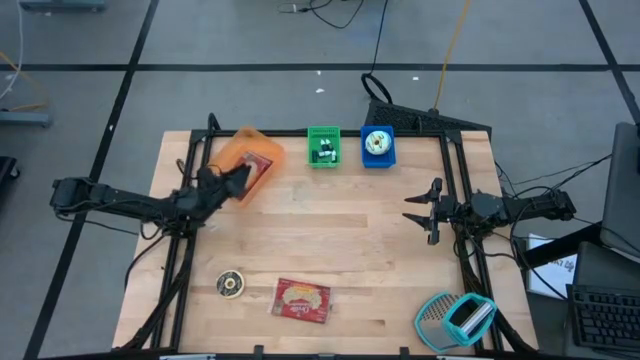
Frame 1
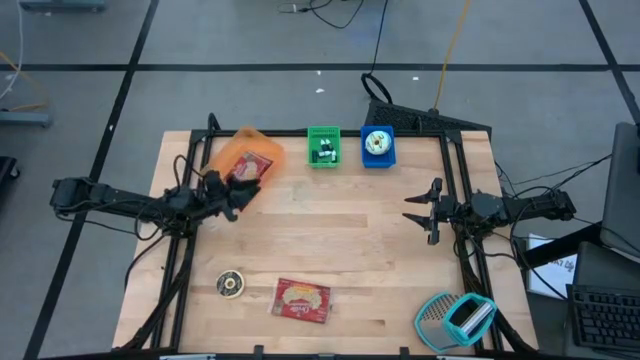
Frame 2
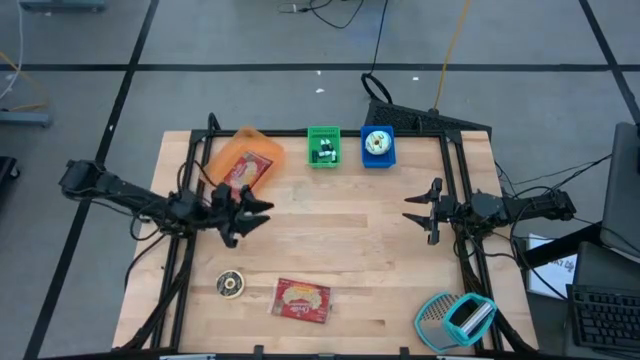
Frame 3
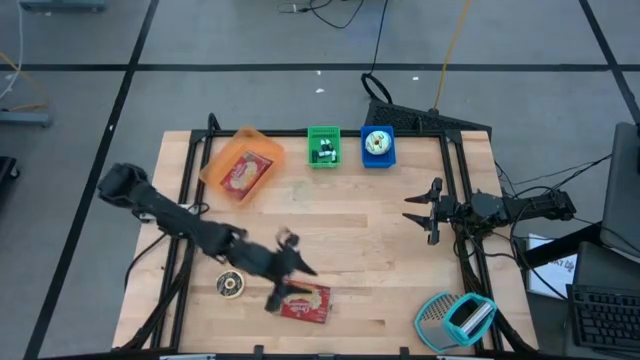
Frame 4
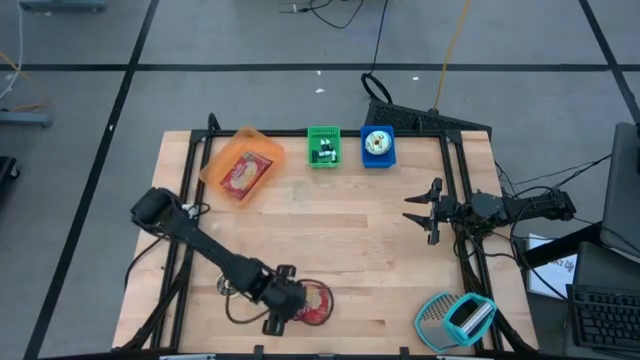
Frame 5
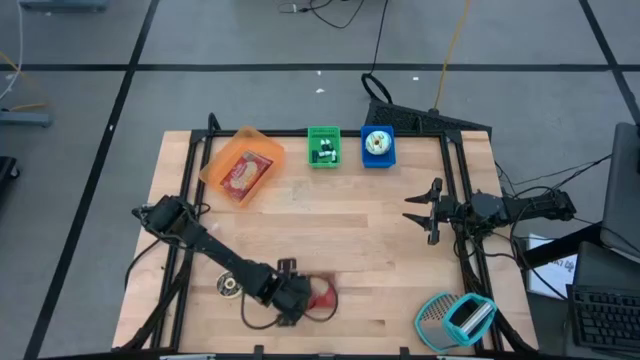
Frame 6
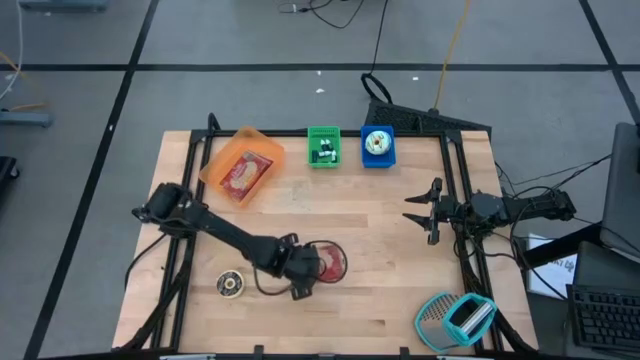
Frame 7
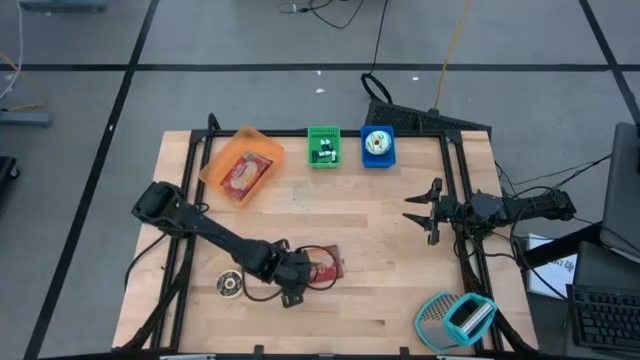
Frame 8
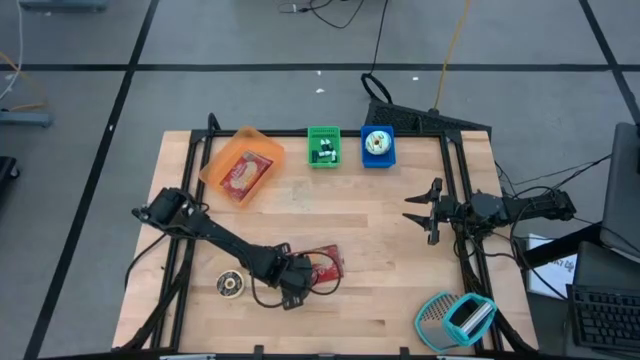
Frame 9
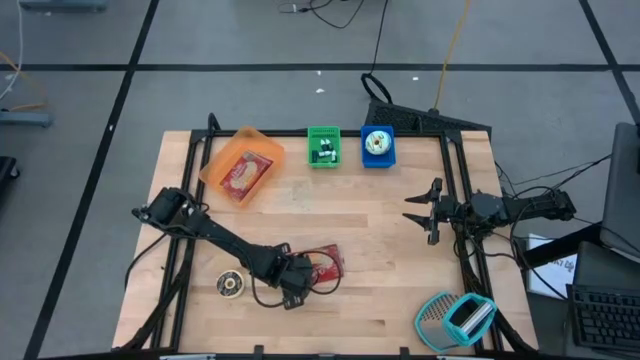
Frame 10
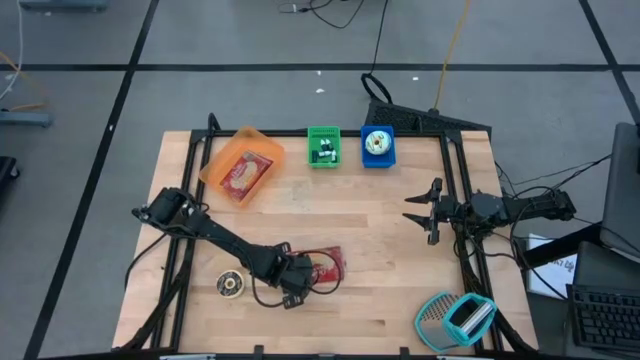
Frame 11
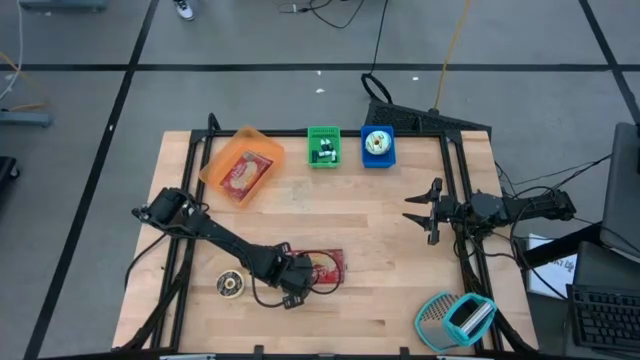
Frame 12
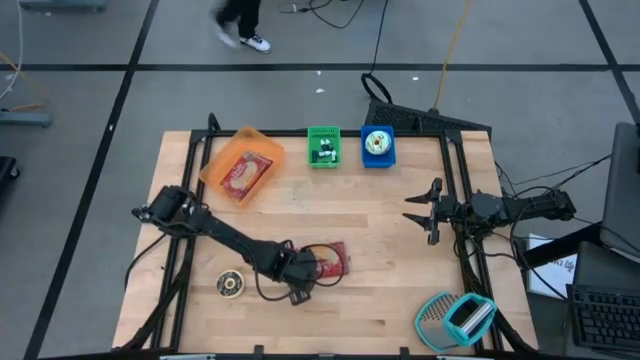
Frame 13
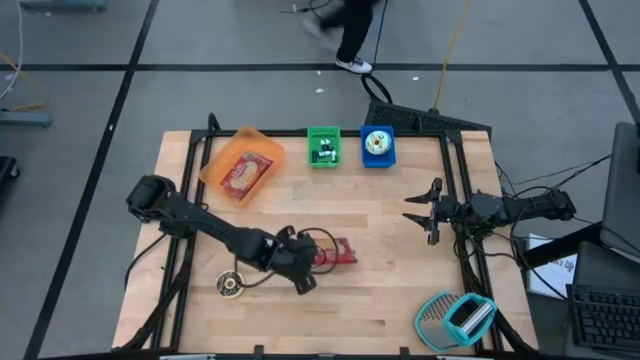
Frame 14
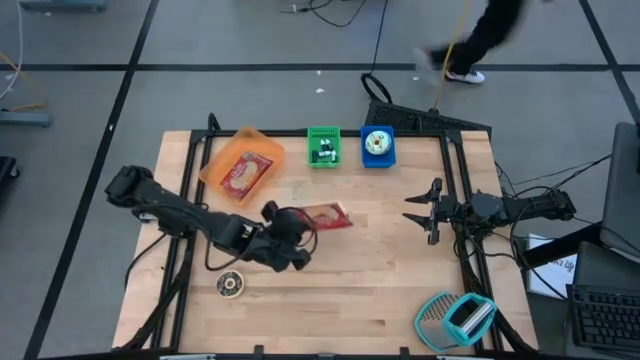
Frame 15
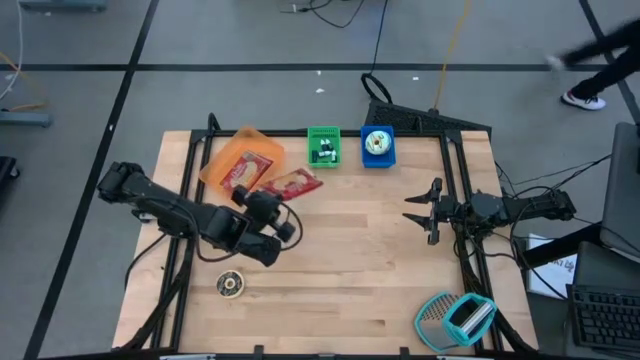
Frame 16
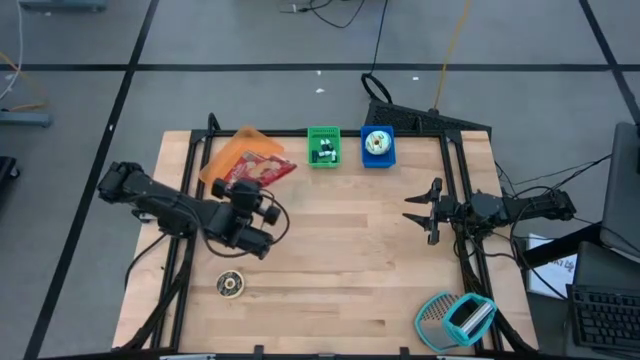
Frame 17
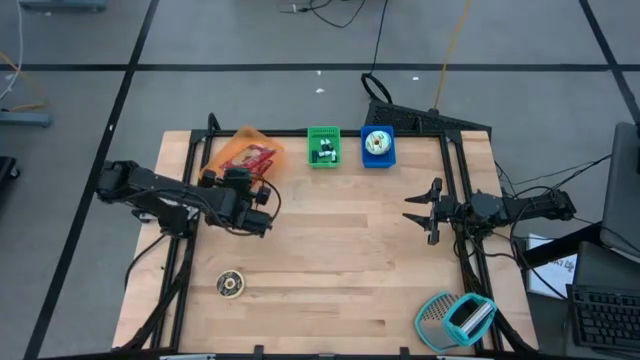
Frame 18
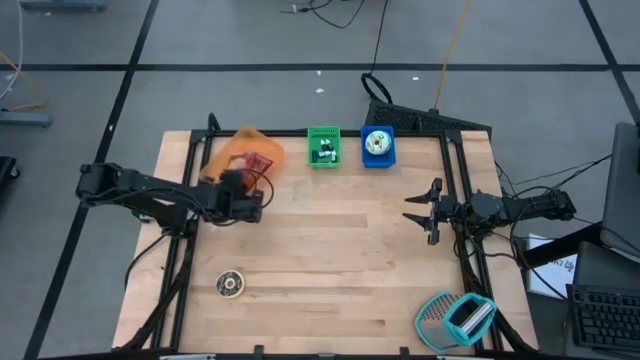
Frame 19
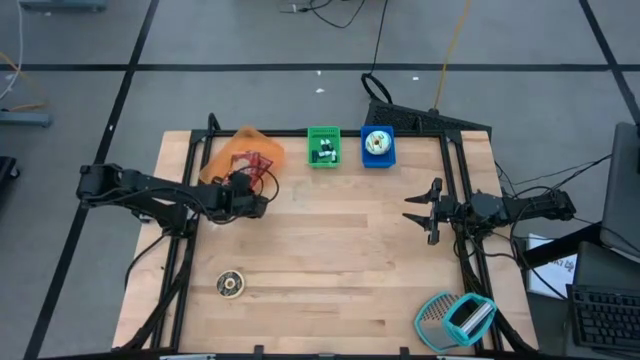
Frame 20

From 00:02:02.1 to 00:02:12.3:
Put the red popcorn bag into the orange bin

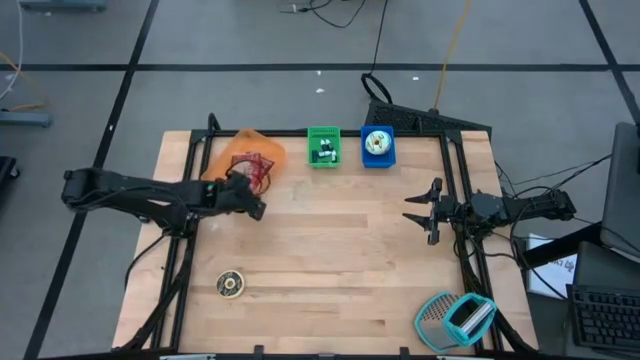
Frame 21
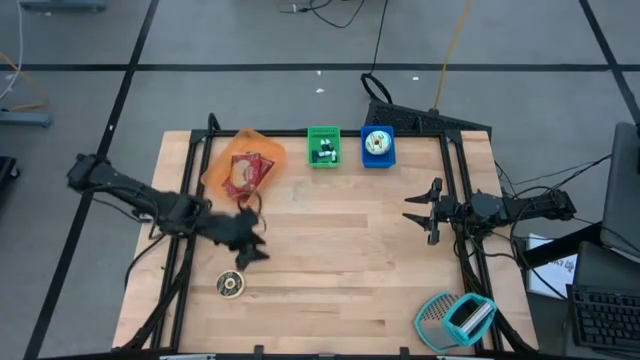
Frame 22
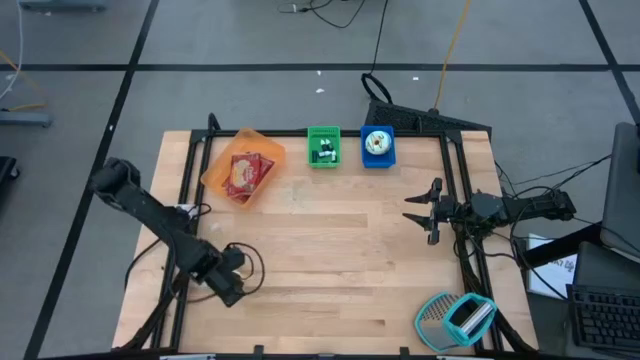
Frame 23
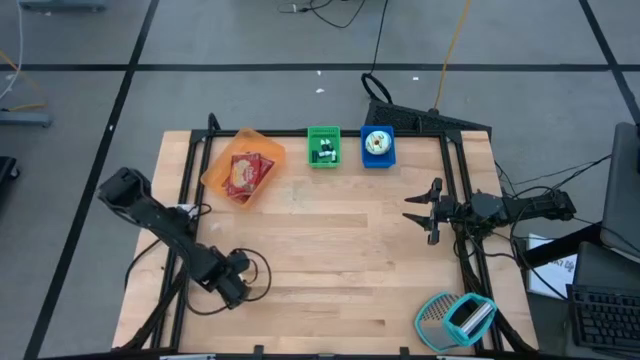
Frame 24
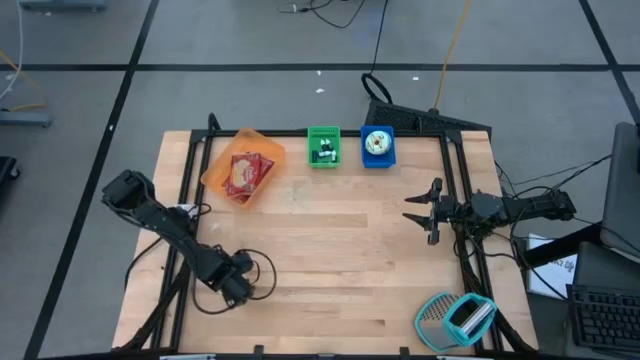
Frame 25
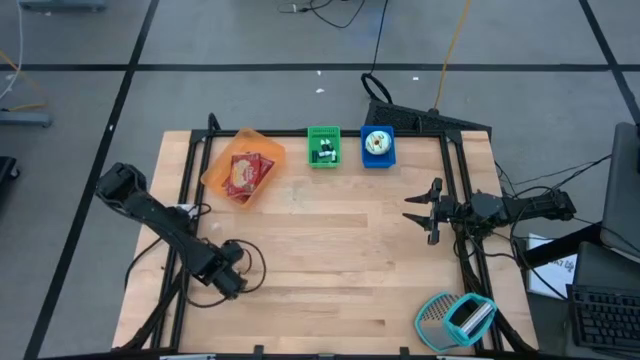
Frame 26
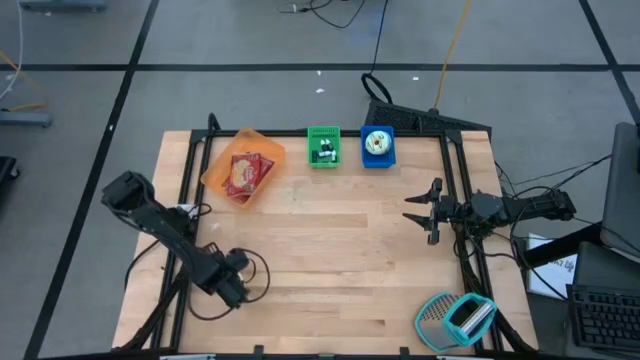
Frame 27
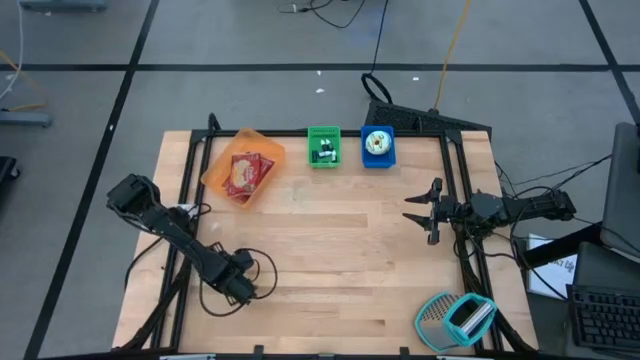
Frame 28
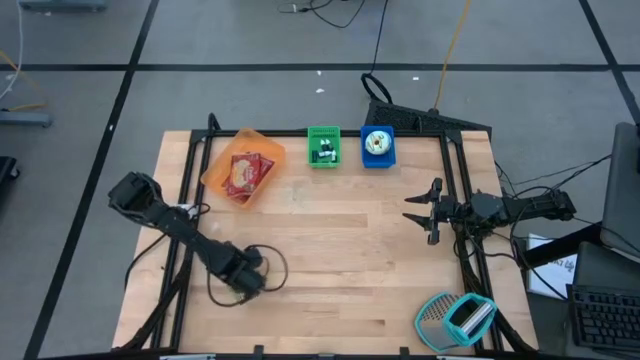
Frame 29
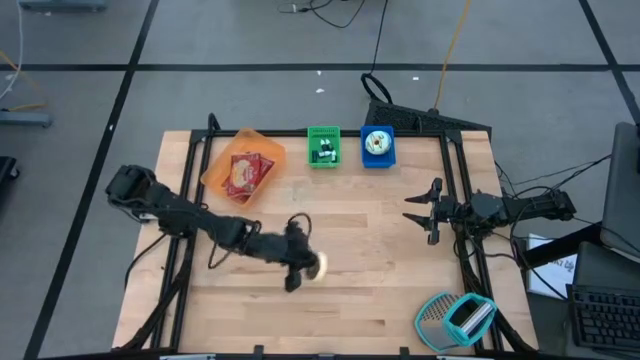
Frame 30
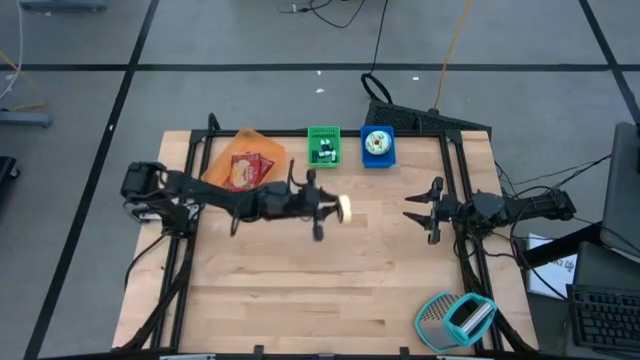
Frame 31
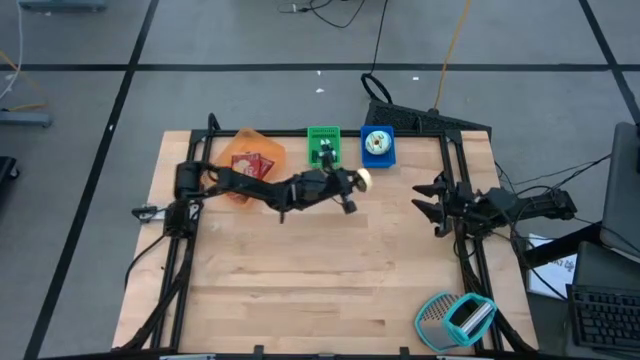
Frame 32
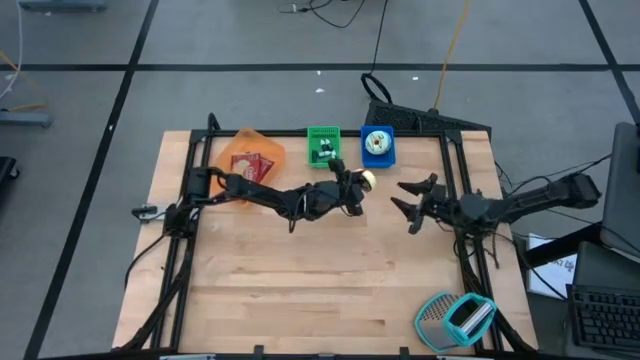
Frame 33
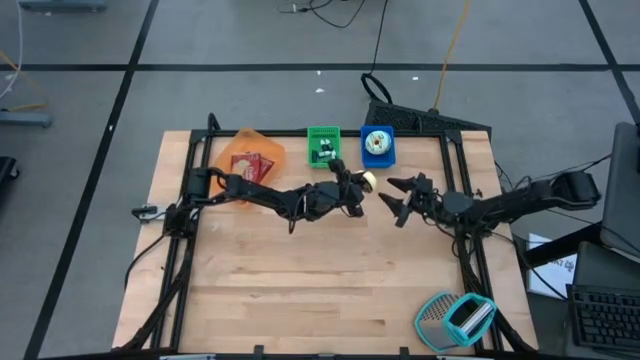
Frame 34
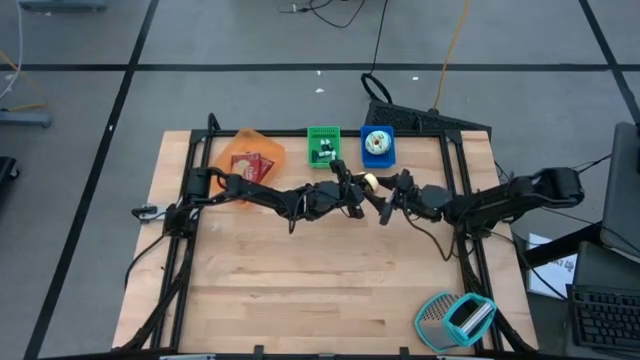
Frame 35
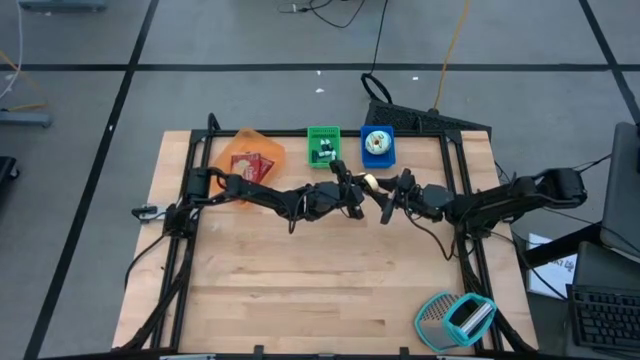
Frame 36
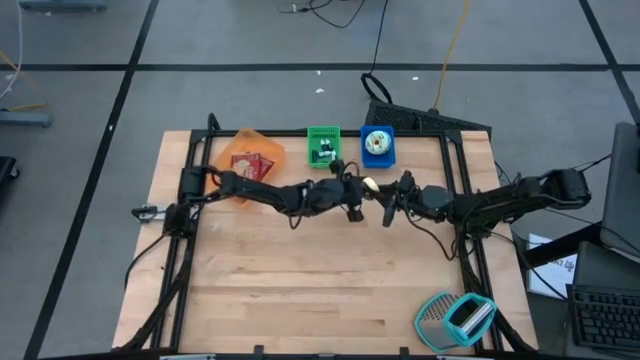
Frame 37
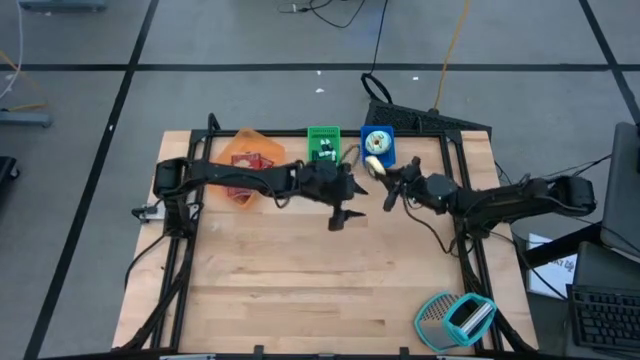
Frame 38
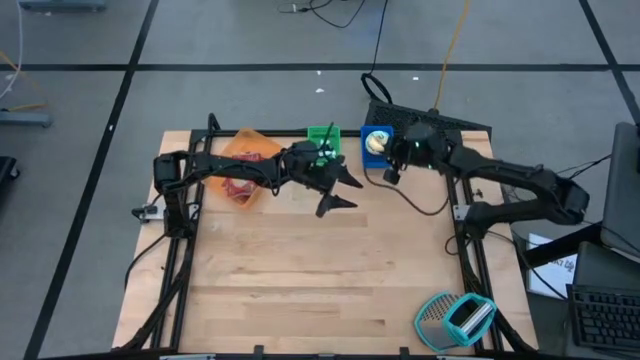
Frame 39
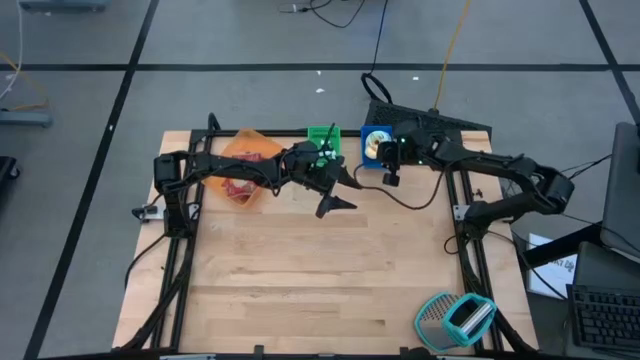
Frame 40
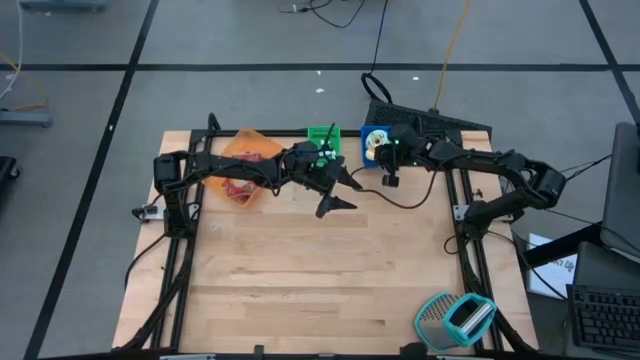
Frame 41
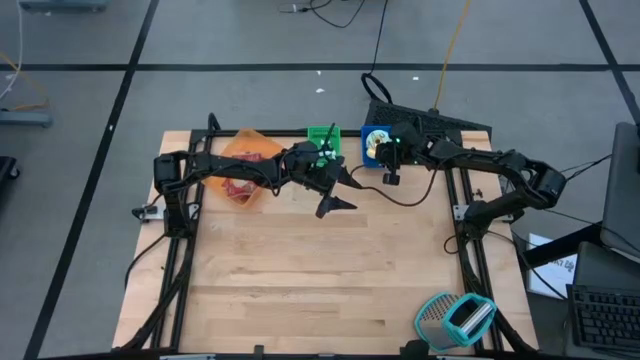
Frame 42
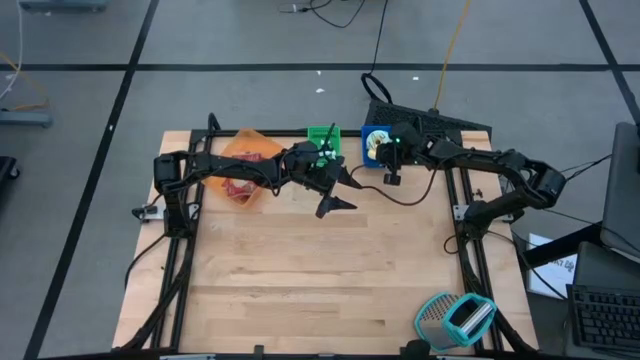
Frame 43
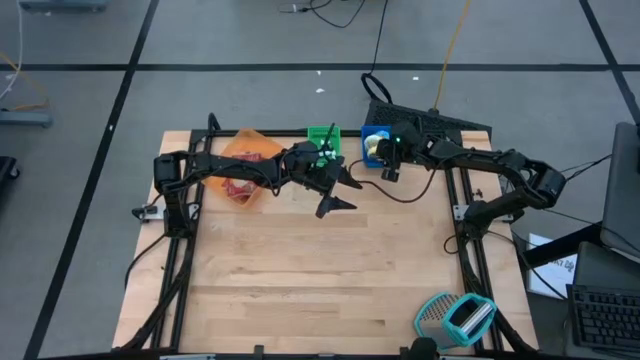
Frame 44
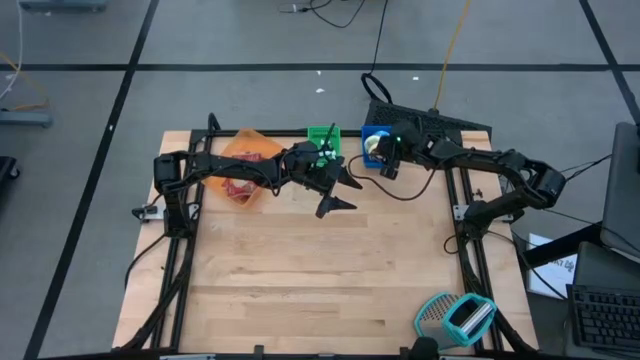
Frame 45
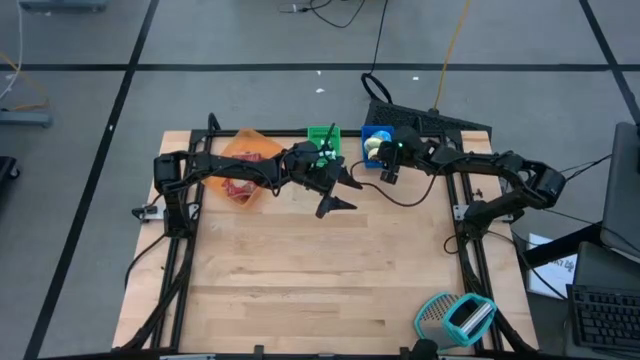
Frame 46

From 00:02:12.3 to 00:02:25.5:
Put the black doughnut into the blue bin
